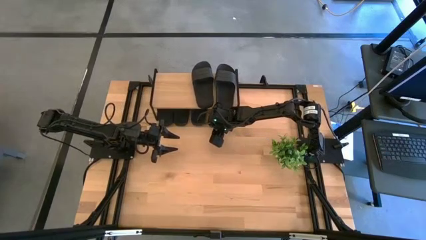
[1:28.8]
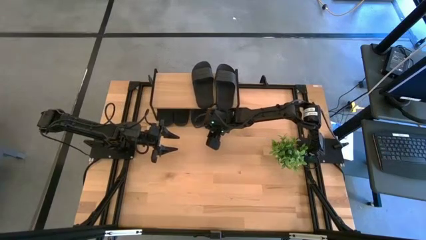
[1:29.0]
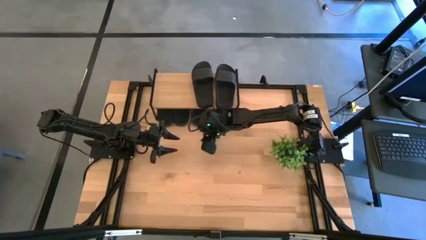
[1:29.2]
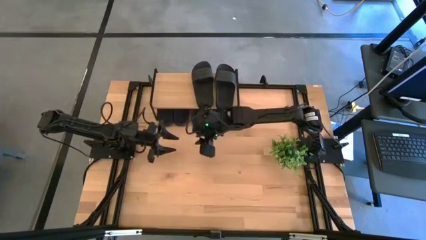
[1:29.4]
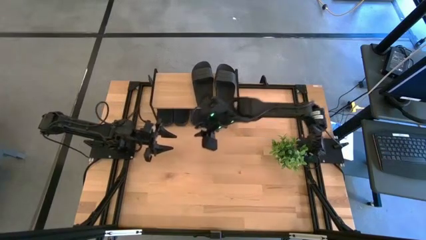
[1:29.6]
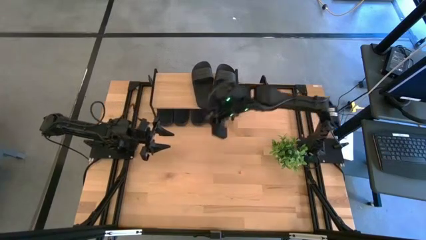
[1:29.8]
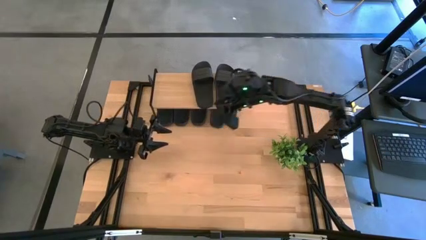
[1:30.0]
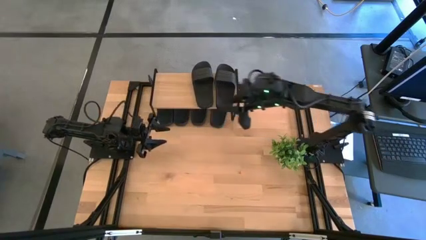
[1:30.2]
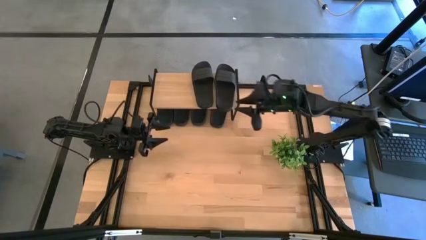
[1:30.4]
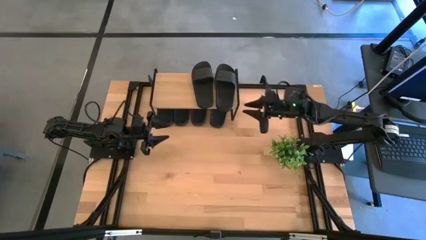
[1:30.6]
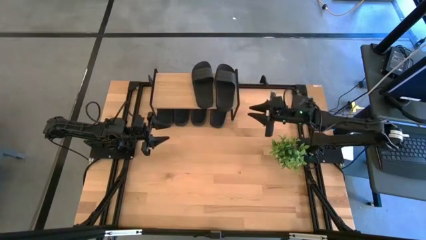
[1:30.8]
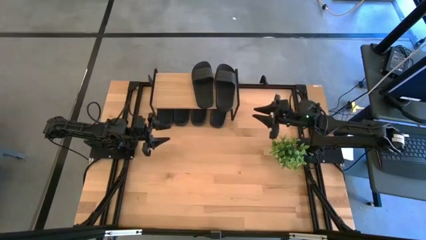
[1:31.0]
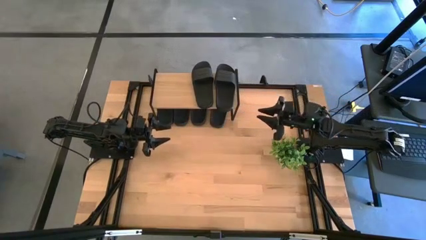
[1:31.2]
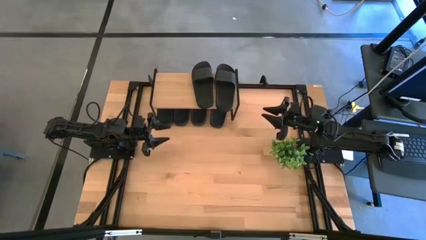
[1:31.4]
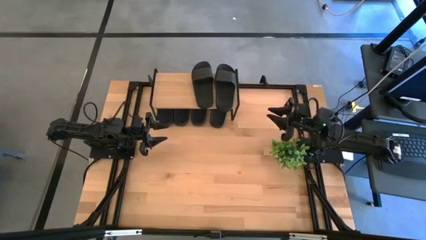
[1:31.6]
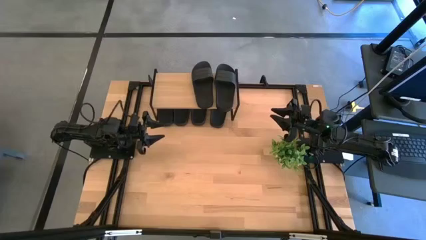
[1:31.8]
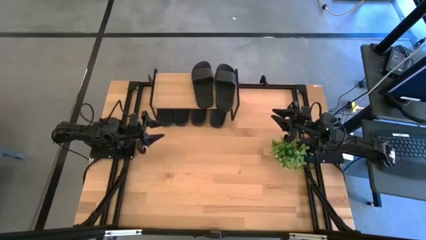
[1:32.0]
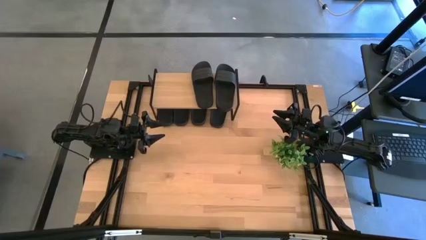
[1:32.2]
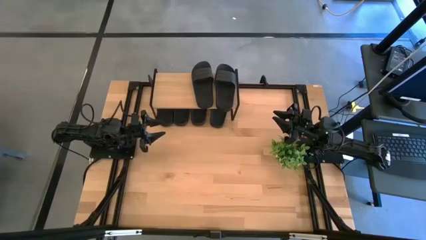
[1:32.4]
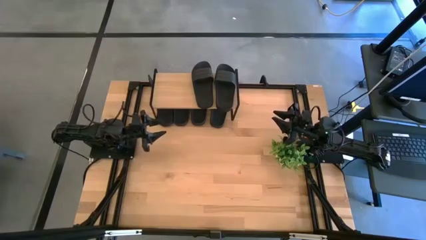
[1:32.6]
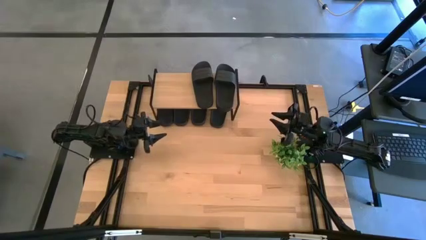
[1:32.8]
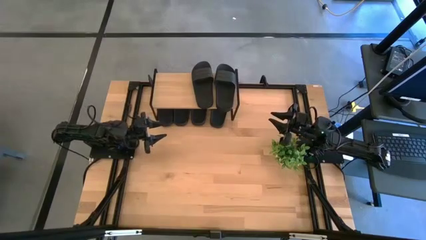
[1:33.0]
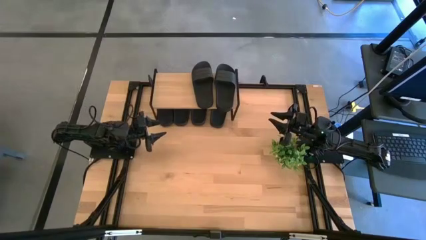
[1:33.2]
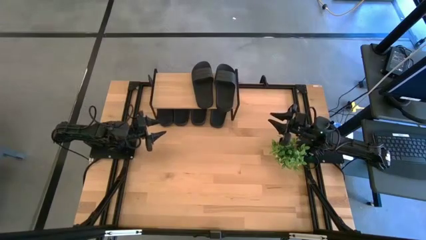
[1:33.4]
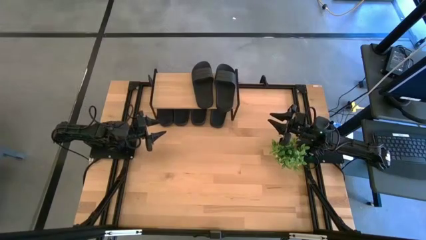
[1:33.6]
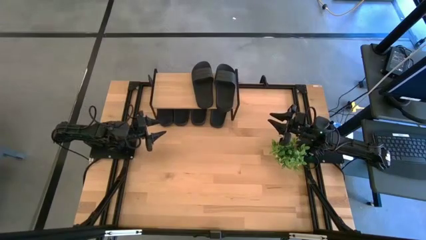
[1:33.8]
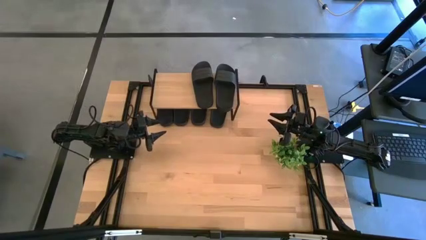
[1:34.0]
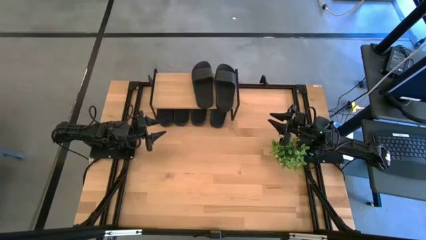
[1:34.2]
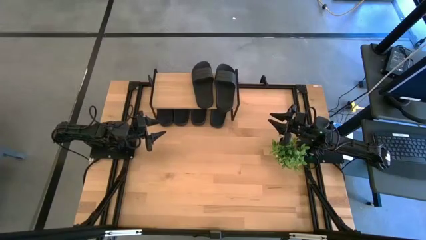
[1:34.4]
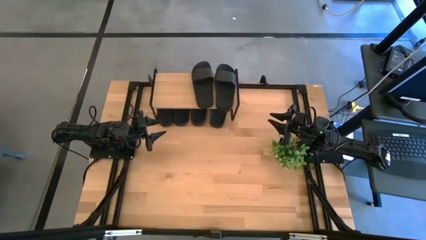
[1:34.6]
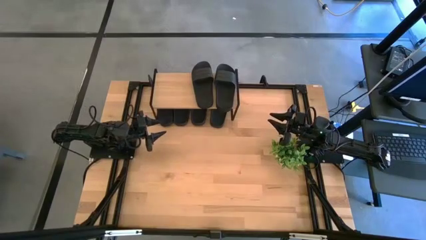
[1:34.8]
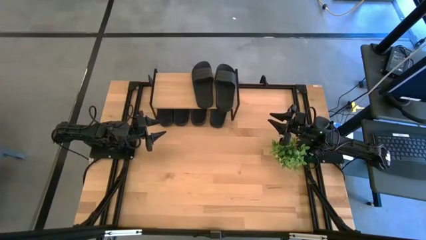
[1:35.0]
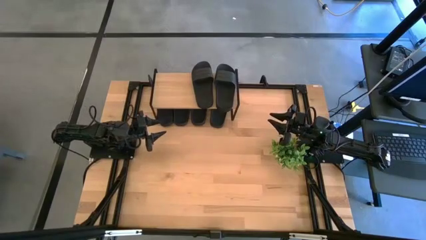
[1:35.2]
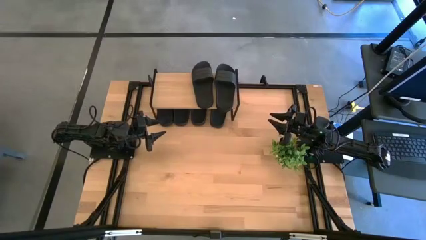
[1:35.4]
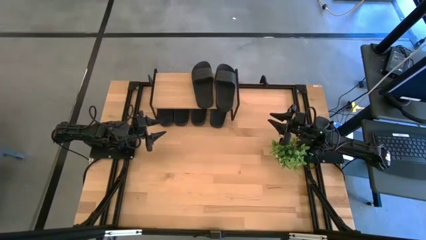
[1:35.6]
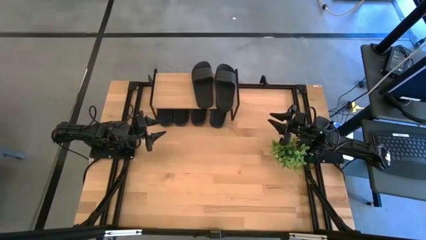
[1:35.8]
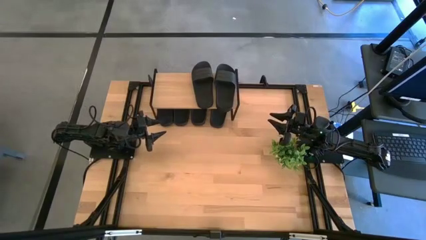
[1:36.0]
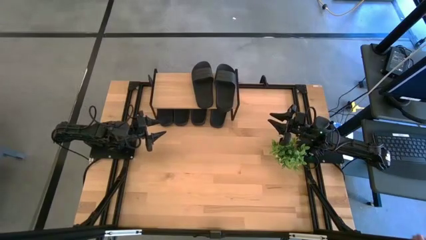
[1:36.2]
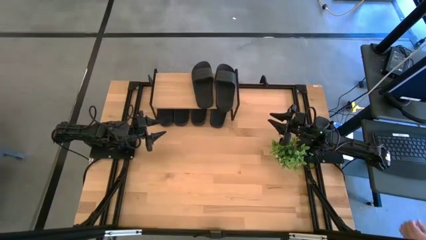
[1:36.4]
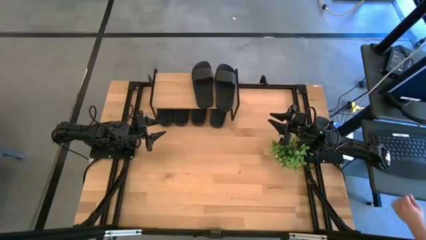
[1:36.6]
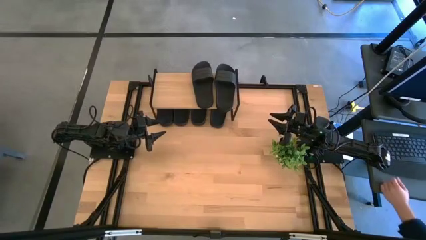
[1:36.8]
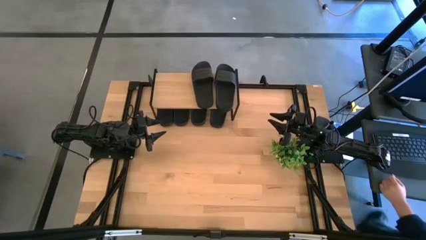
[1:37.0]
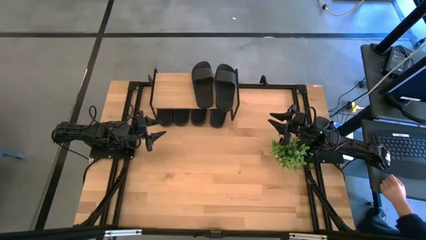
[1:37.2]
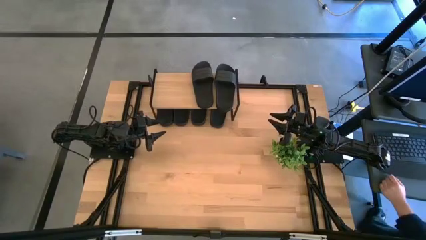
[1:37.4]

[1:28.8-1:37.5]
Task: Pick and place slides into the shelf
Return to Home Position

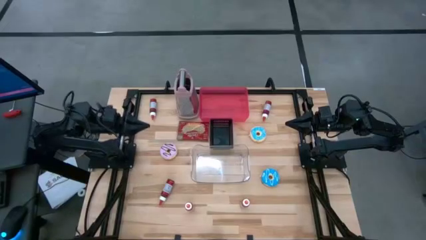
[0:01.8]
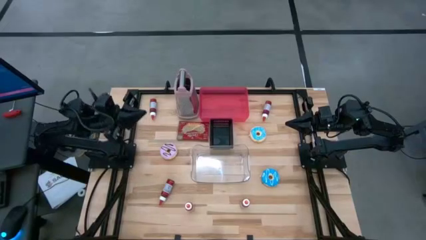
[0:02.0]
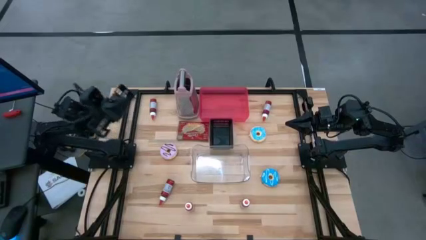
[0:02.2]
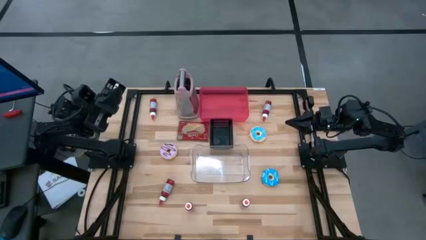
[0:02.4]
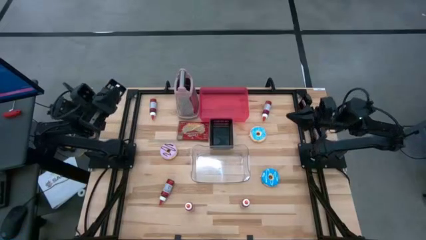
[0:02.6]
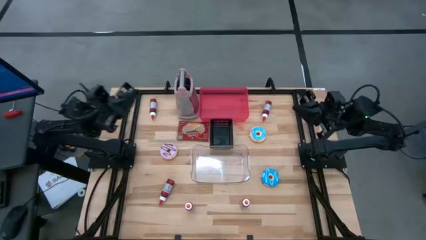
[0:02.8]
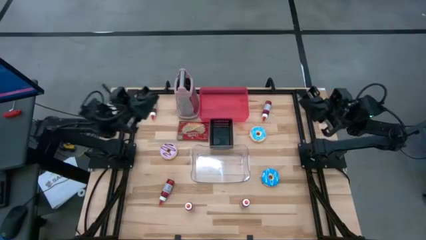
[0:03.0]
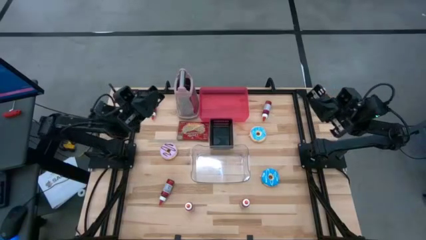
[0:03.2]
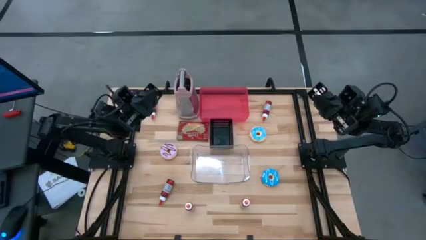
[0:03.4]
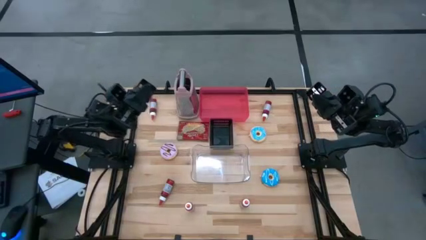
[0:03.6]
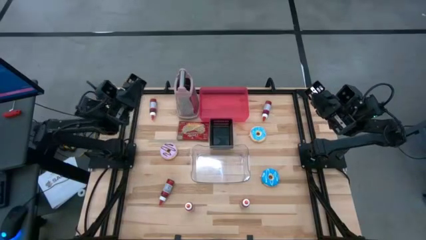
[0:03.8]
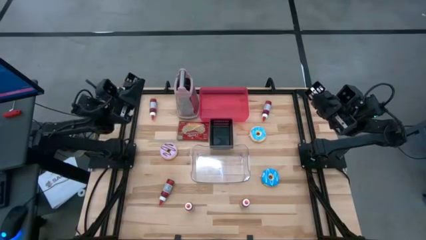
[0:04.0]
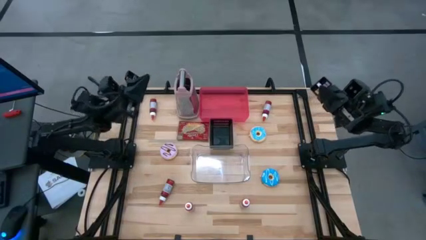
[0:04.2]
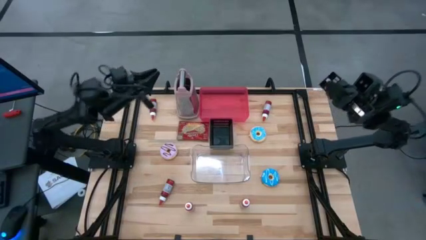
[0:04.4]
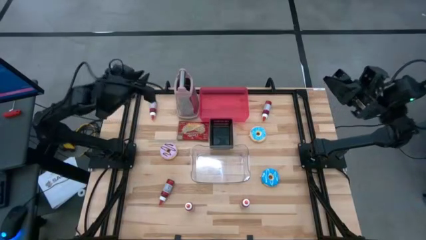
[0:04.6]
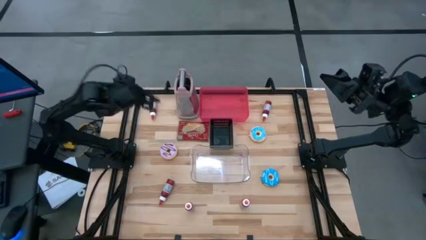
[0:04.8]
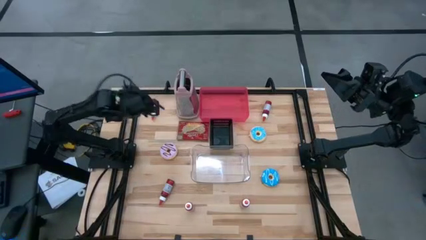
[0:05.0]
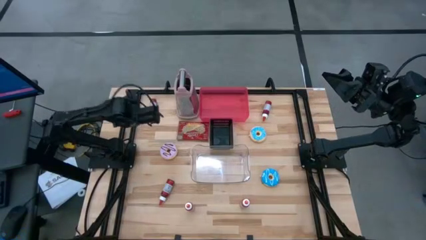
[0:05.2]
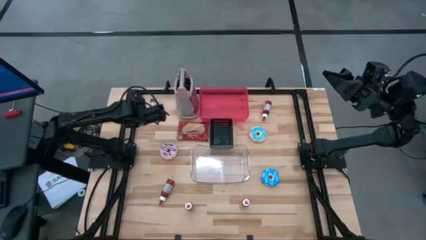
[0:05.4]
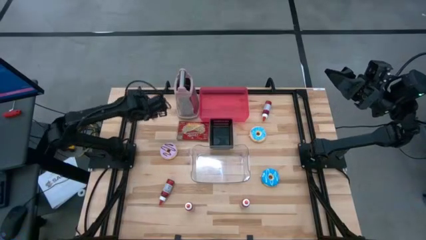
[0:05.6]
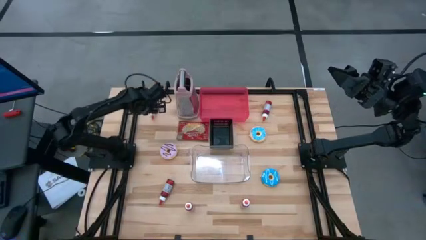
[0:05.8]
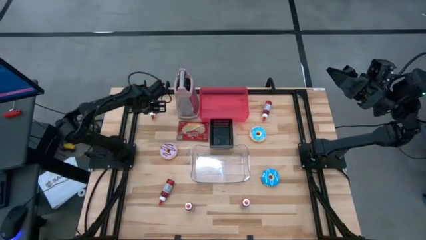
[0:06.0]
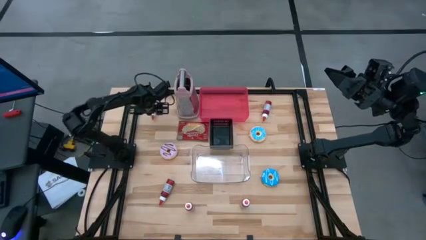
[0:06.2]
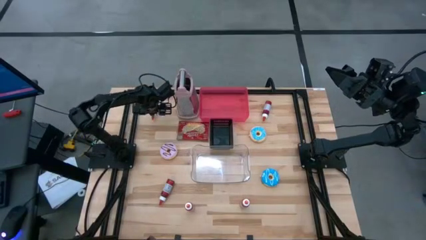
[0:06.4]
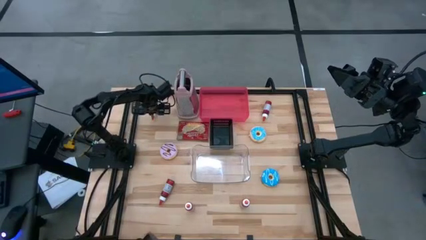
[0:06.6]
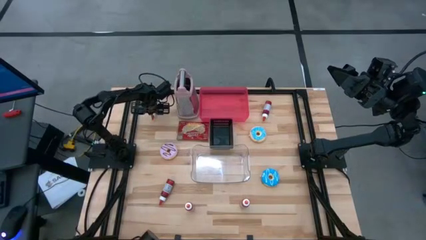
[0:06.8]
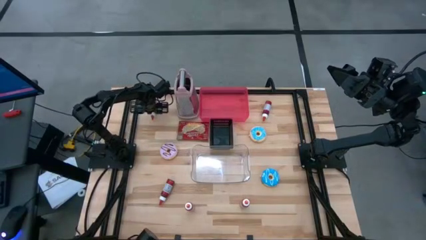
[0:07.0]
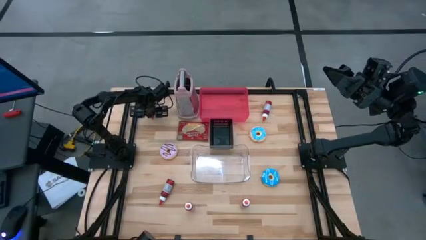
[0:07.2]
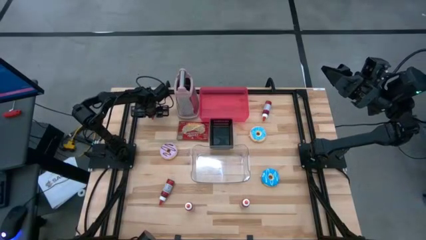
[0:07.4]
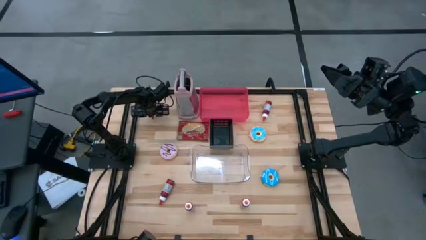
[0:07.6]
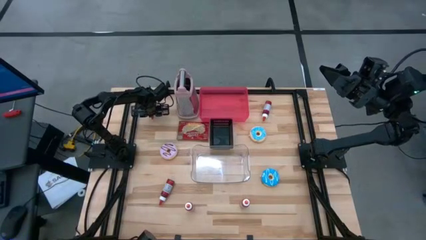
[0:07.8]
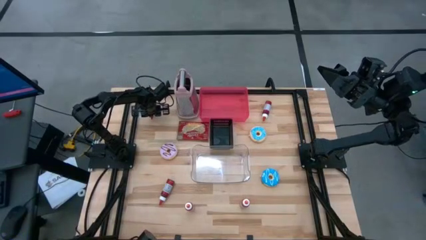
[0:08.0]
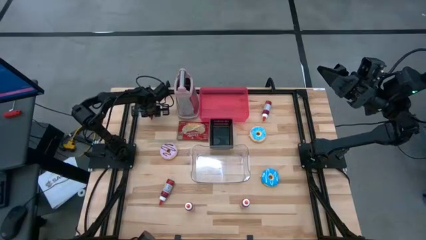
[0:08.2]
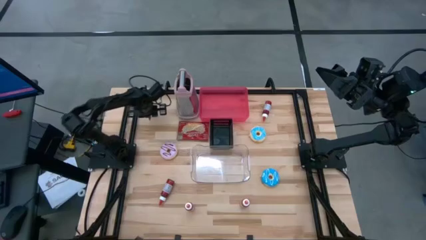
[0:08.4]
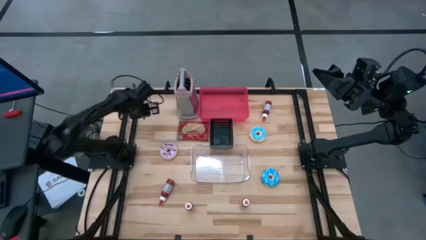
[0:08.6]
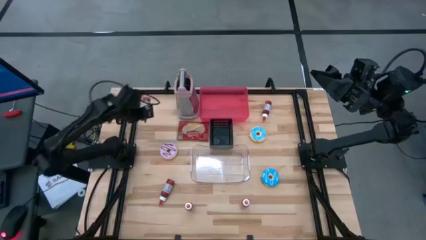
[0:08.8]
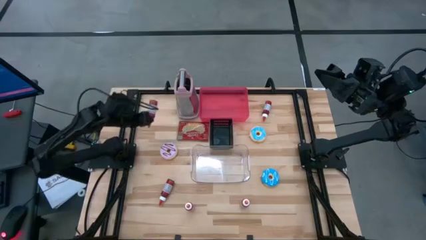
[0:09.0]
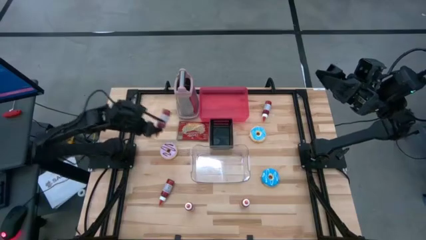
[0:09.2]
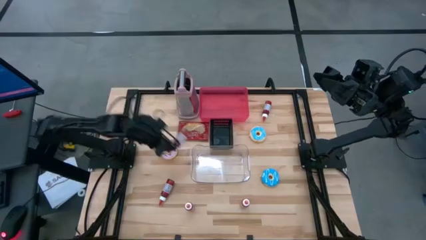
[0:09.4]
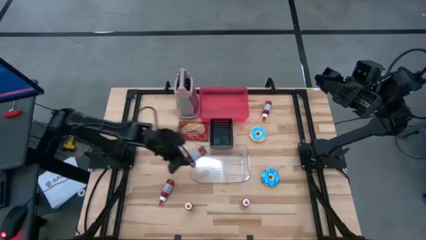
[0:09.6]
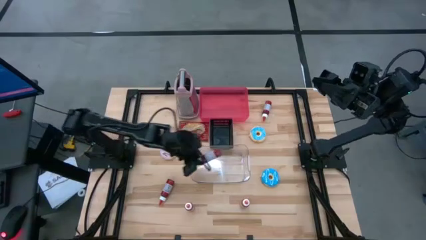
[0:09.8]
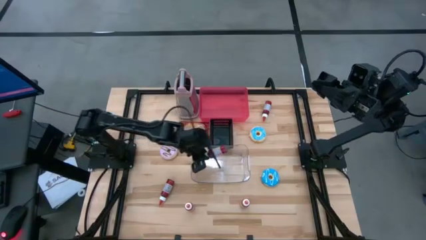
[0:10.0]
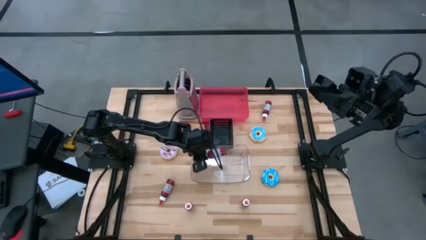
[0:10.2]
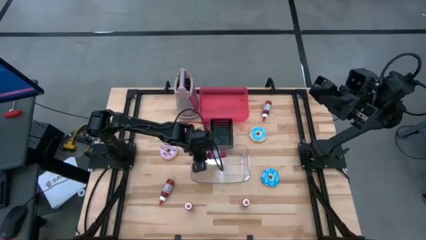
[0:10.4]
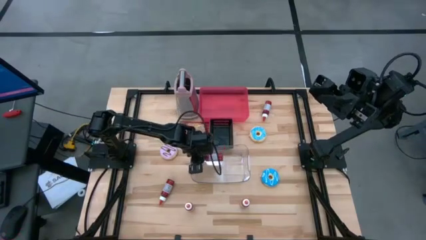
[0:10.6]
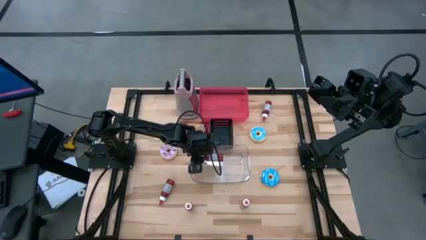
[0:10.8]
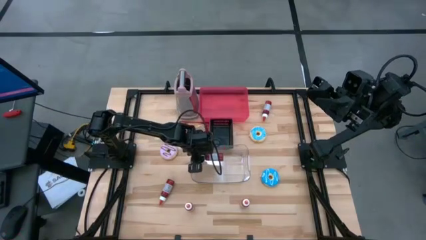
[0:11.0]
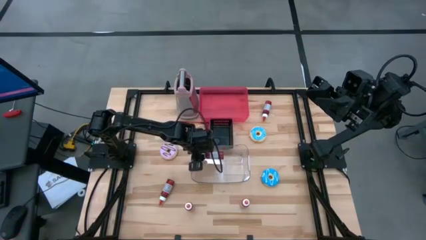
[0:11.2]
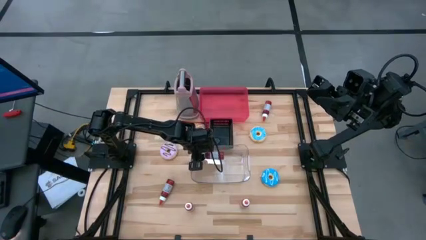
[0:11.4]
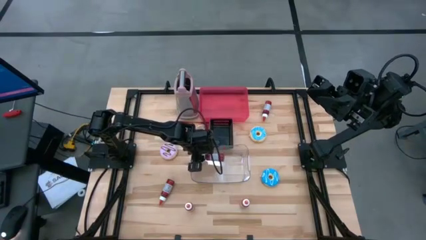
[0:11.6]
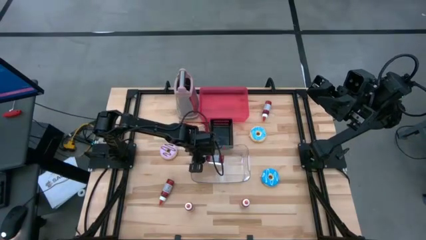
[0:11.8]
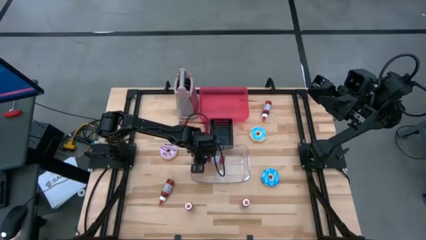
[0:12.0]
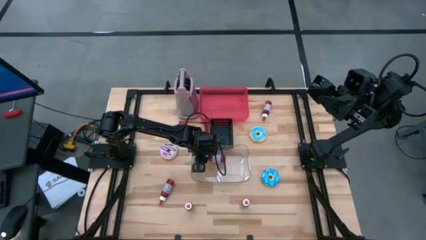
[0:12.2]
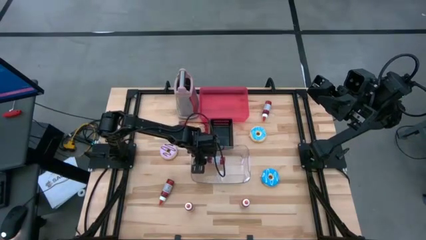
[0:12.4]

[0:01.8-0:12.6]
Task: Pick & Place Food Item
Put the top left red food coloring bottle into the transparent bin
